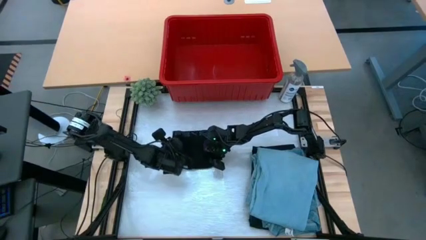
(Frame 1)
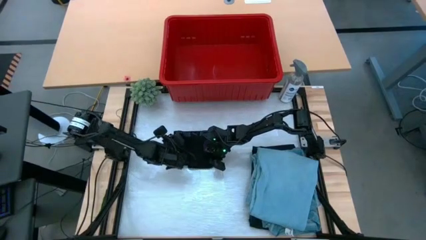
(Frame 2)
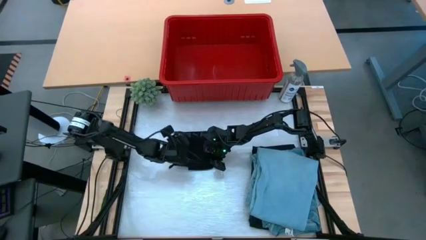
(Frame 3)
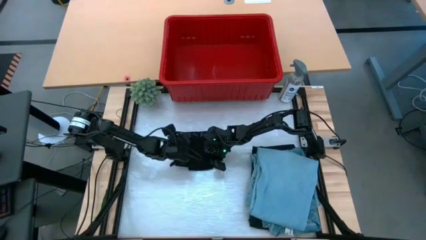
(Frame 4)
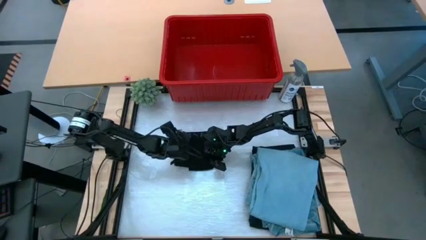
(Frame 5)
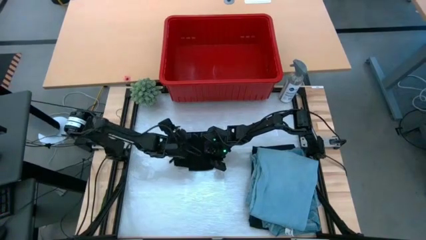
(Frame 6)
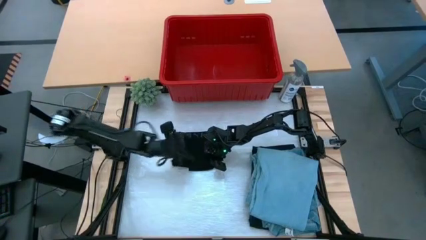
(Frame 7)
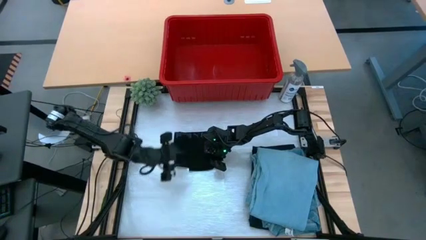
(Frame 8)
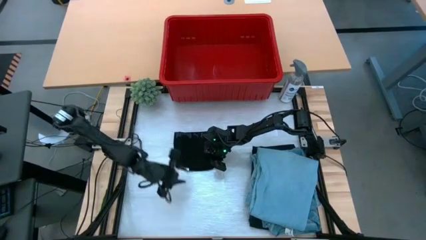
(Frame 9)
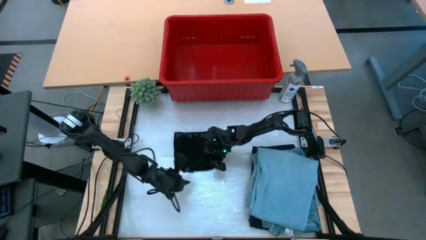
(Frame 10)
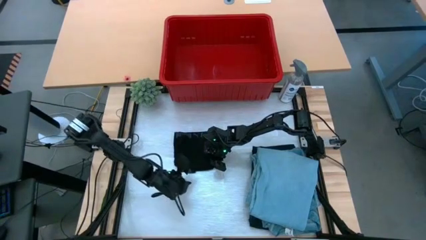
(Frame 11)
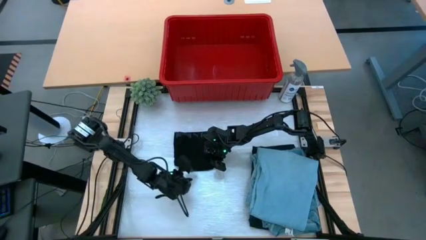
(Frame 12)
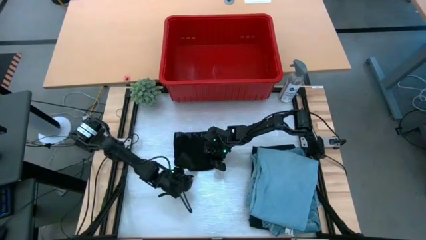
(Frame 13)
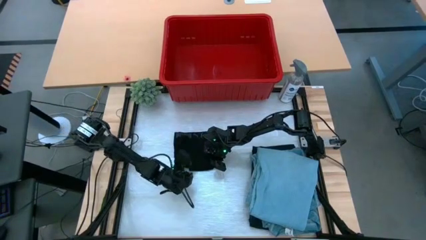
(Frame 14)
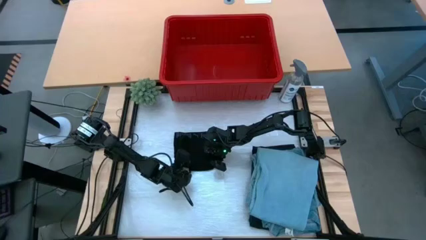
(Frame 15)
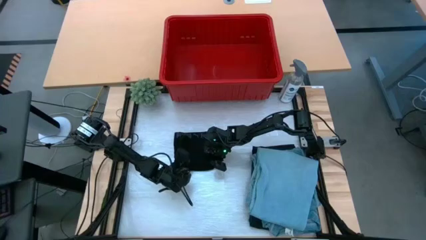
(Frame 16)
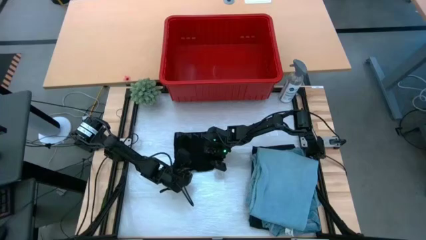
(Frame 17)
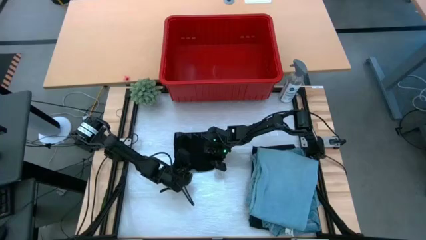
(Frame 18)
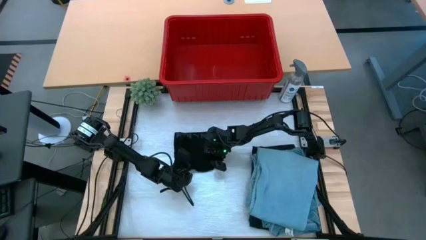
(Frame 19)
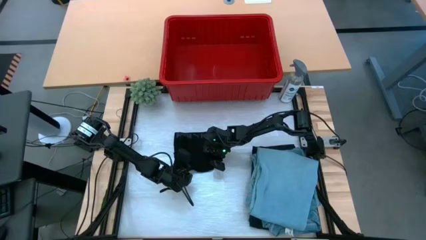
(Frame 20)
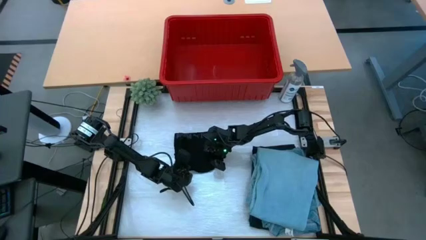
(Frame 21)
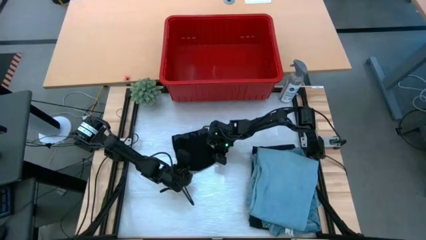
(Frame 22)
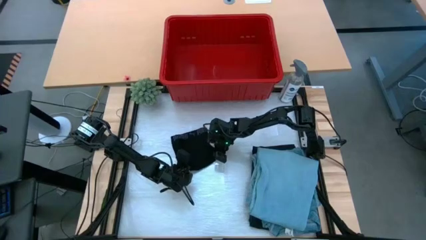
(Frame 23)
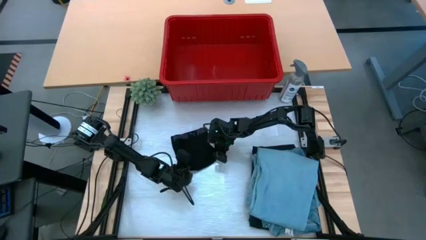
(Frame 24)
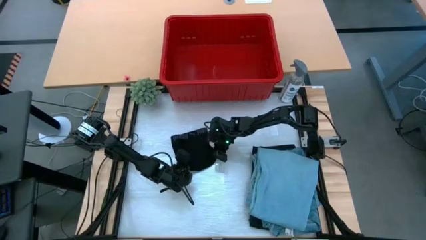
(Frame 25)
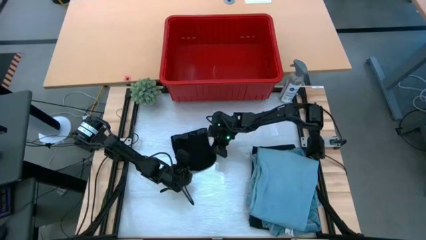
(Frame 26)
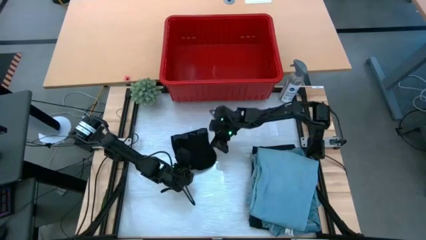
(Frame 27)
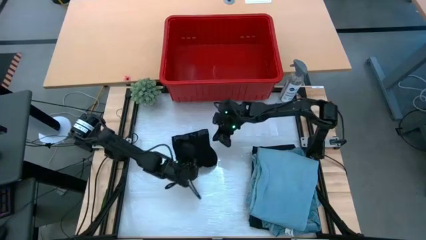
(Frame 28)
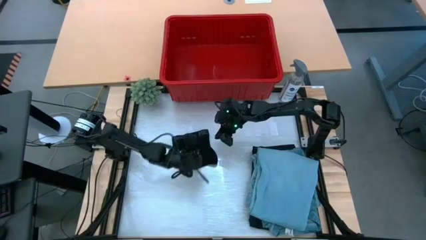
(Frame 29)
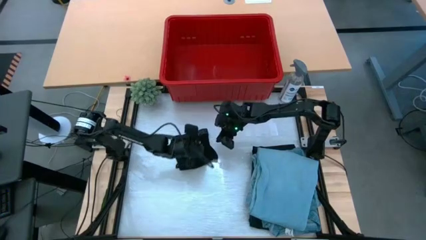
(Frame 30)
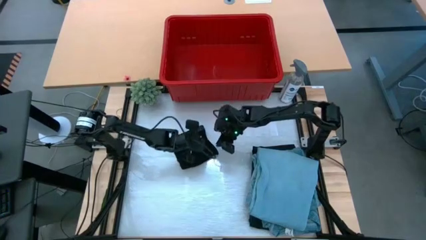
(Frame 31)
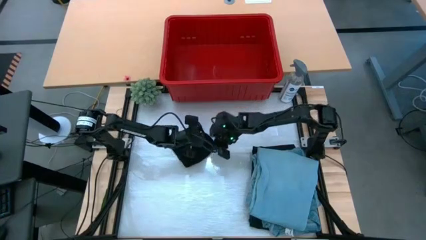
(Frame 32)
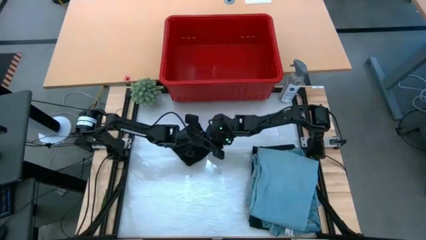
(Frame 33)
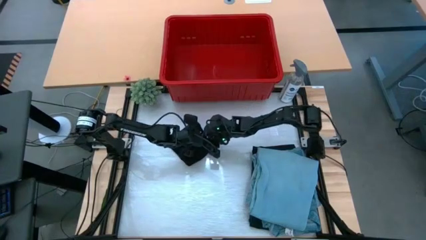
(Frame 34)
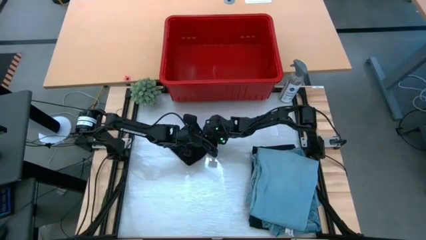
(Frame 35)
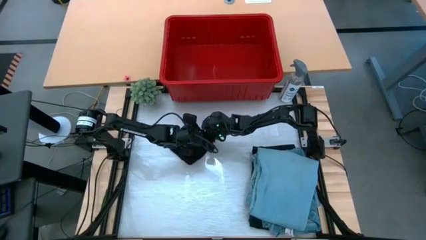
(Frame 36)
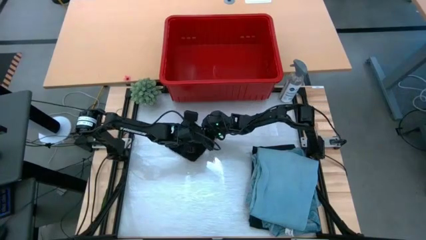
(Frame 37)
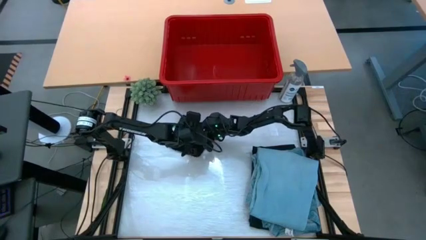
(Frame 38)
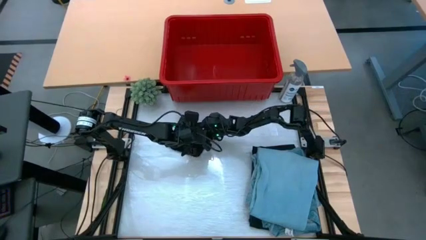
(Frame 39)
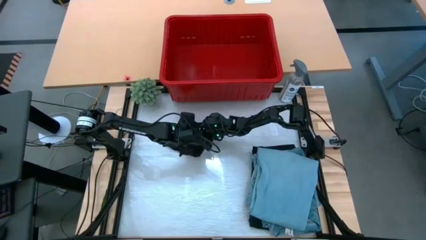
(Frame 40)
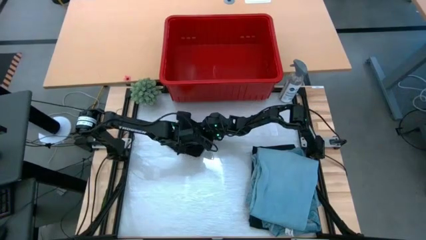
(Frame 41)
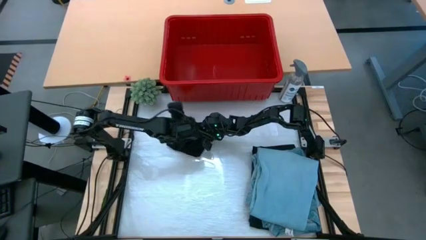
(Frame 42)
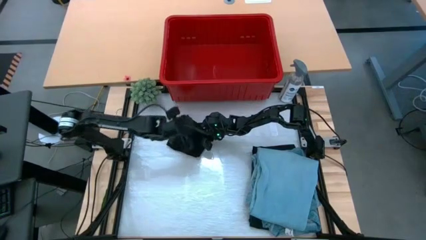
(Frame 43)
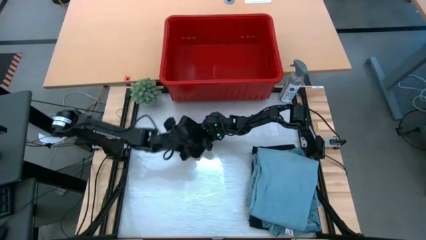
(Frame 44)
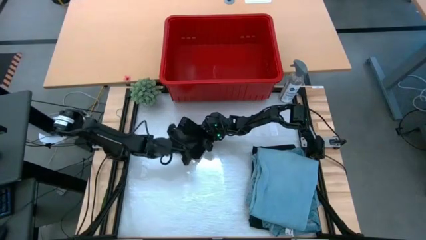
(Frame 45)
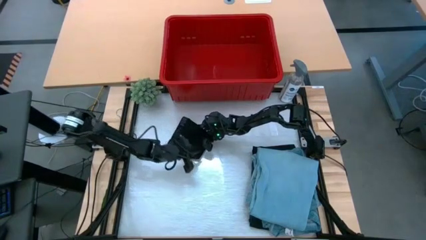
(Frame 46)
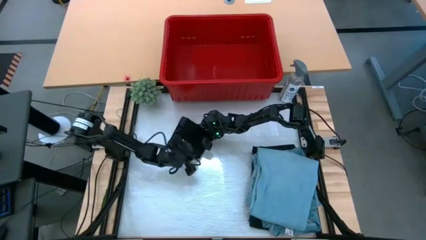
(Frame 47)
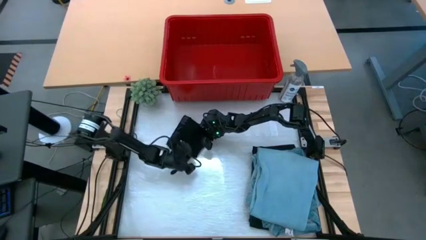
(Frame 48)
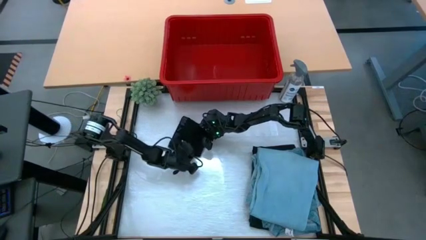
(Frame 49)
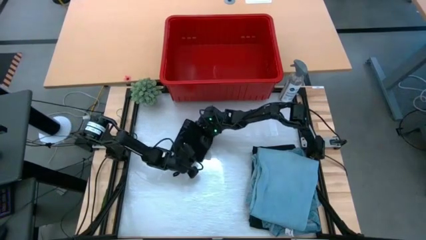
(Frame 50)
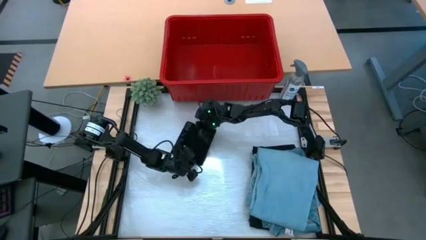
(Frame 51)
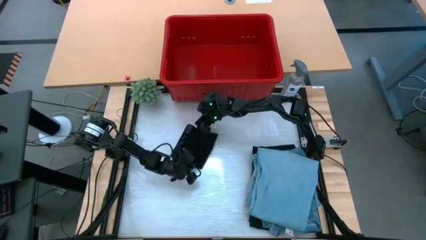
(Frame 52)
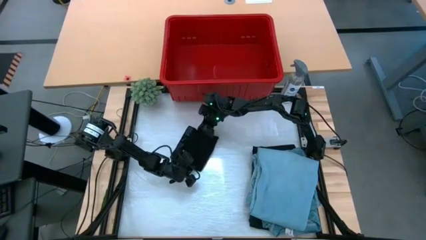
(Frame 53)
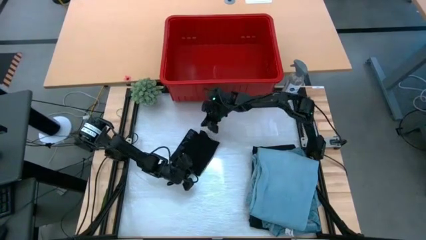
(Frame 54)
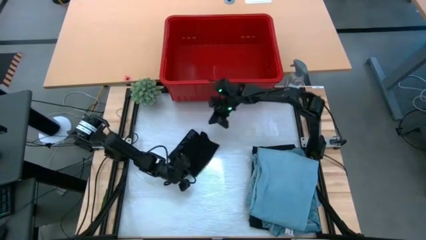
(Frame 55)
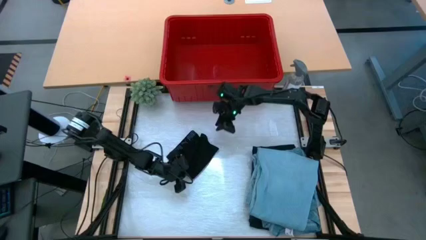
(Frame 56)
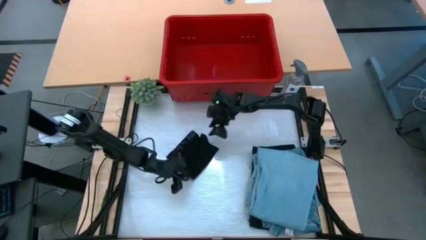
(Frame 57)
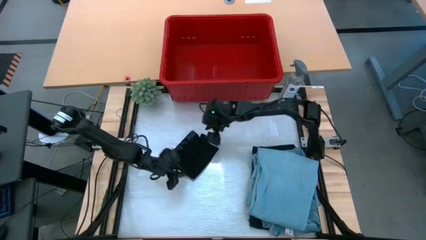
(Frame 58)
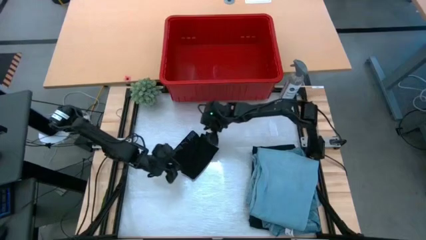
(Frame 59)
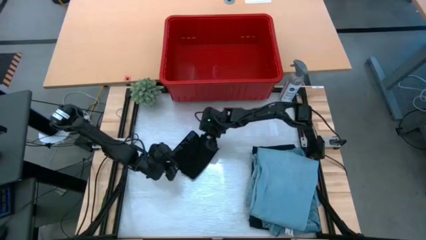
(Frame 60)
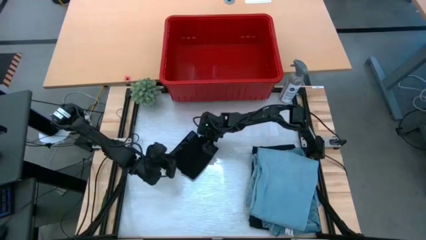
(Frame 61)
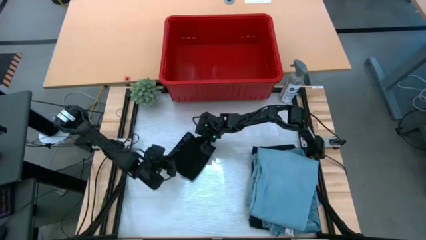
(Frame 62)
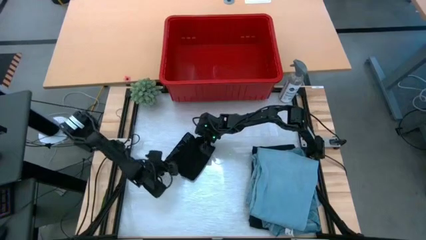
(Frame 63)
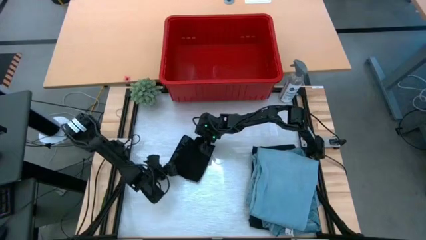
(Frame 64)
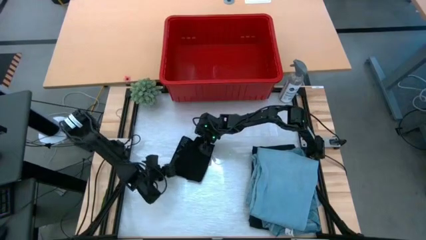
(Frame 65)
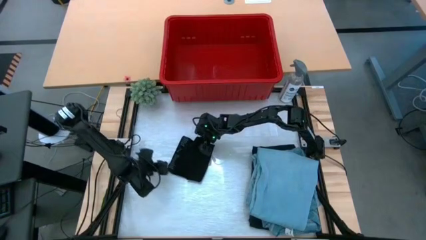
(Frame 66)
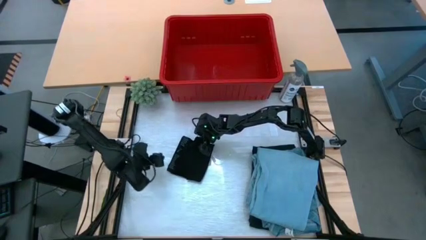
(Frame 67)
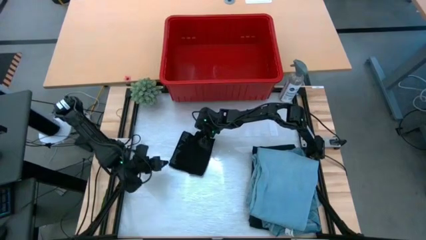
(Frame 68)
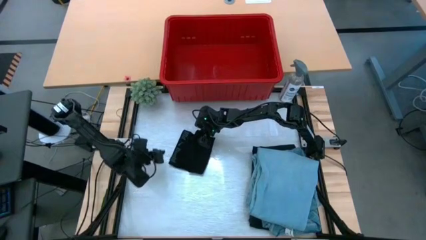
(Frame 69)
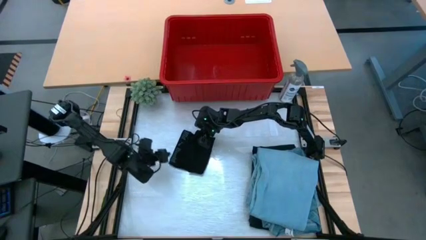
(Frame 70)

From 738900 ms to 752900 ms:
Task: Fold Laundry from Bin
Fold the black boxer
